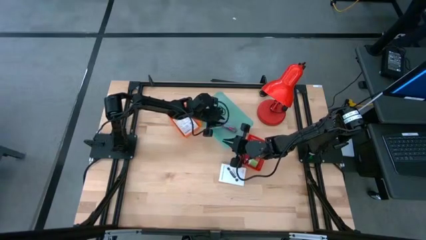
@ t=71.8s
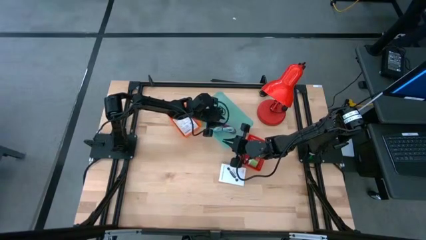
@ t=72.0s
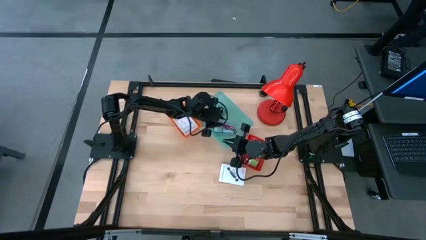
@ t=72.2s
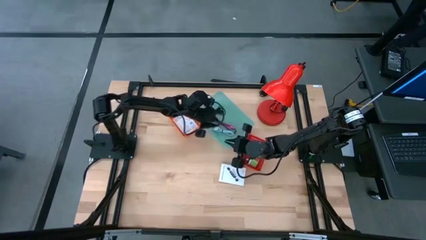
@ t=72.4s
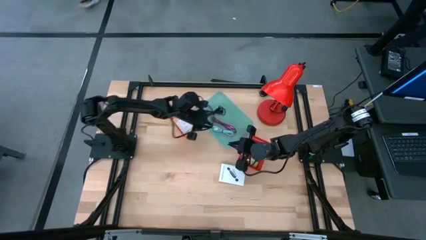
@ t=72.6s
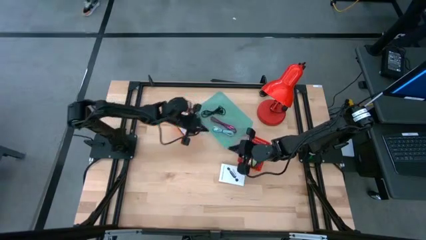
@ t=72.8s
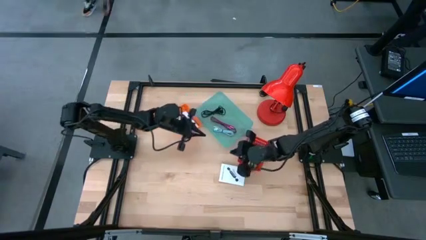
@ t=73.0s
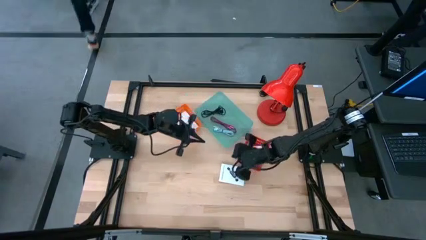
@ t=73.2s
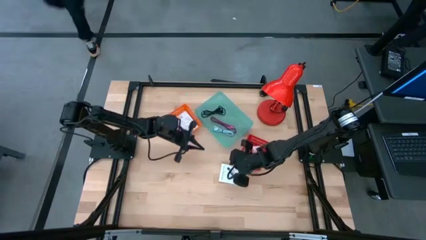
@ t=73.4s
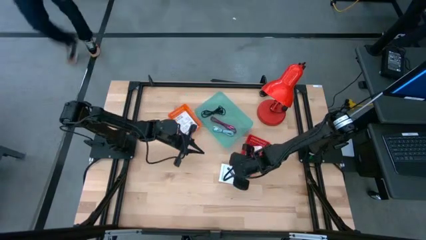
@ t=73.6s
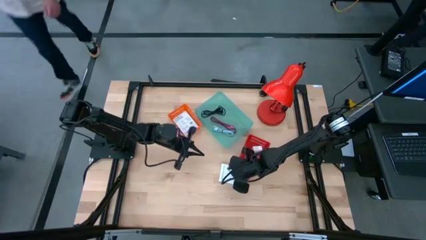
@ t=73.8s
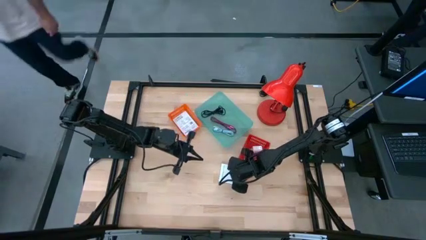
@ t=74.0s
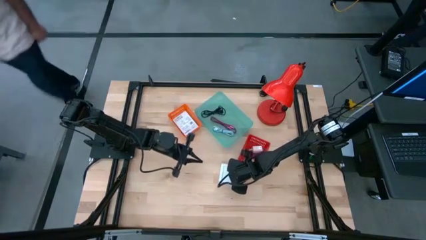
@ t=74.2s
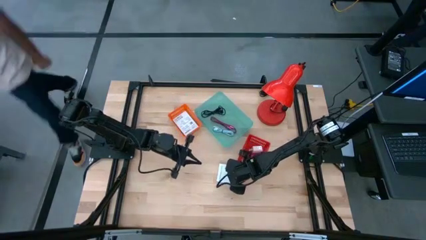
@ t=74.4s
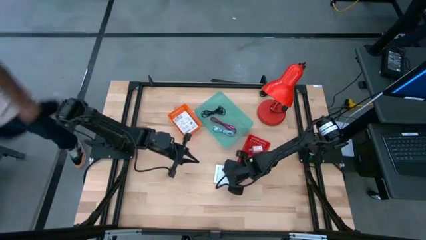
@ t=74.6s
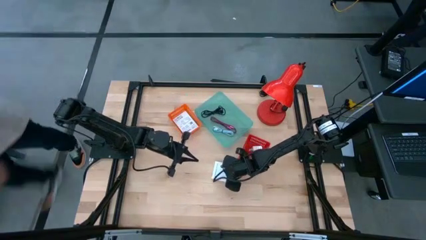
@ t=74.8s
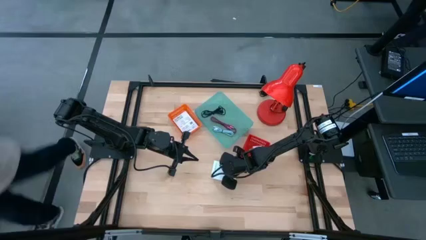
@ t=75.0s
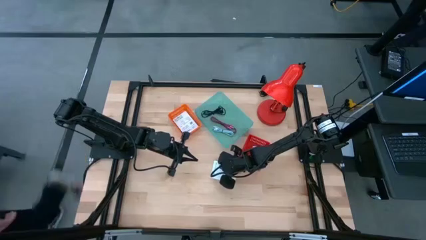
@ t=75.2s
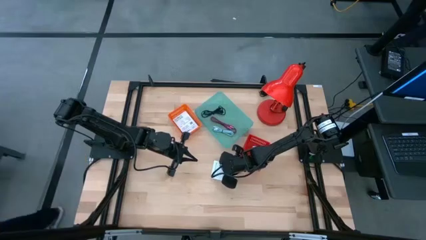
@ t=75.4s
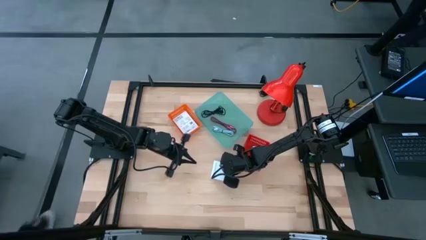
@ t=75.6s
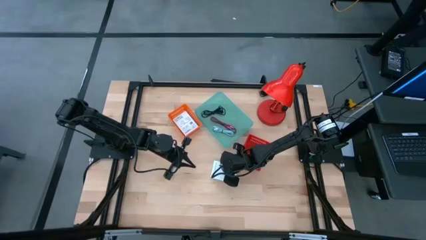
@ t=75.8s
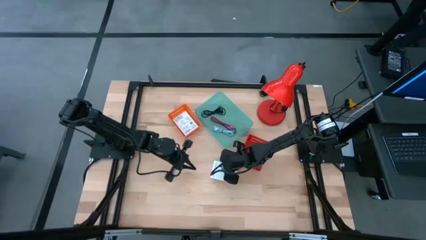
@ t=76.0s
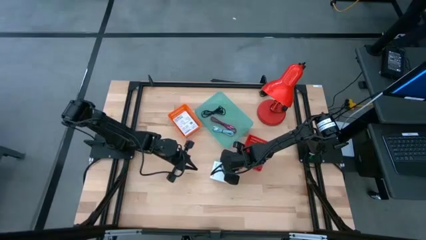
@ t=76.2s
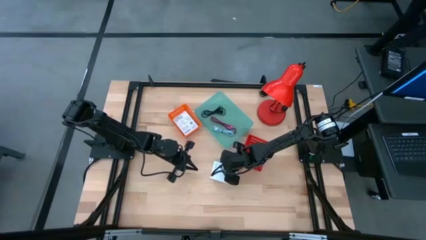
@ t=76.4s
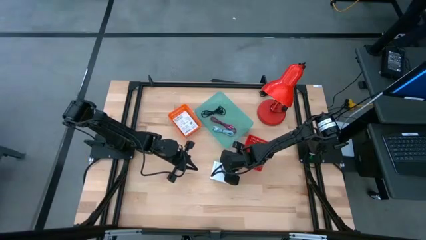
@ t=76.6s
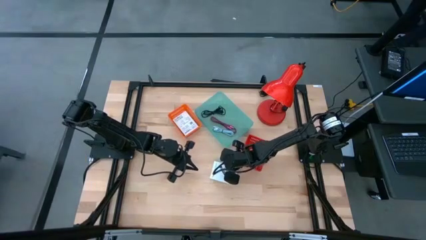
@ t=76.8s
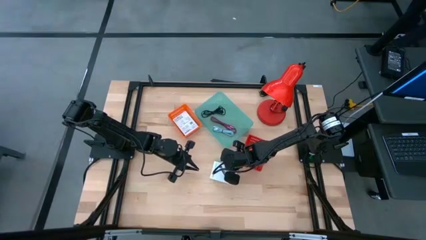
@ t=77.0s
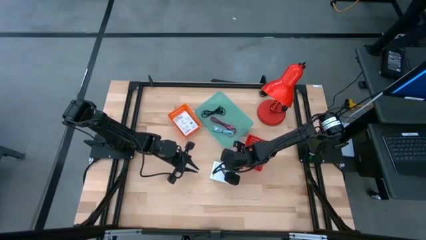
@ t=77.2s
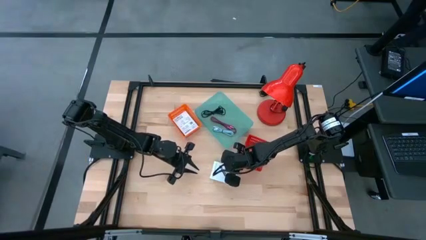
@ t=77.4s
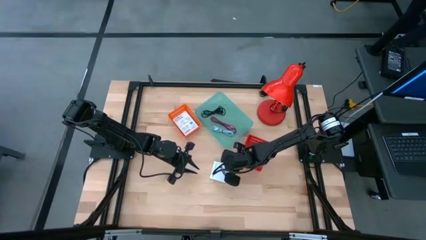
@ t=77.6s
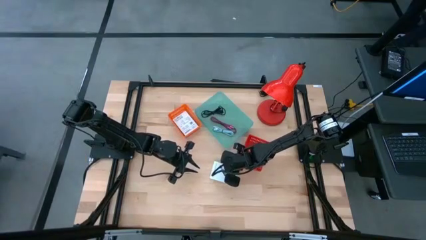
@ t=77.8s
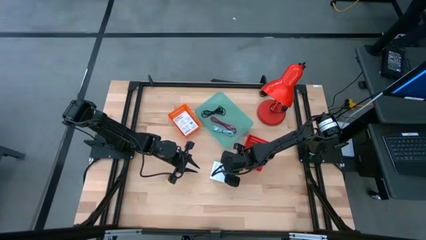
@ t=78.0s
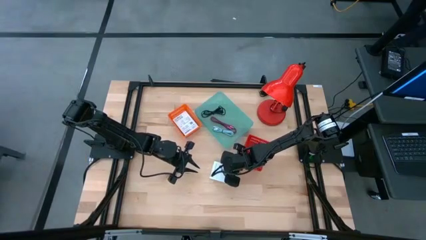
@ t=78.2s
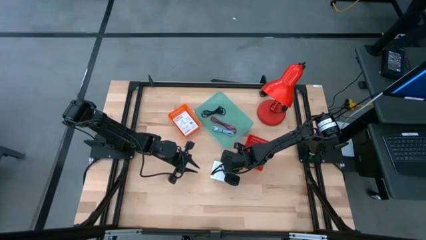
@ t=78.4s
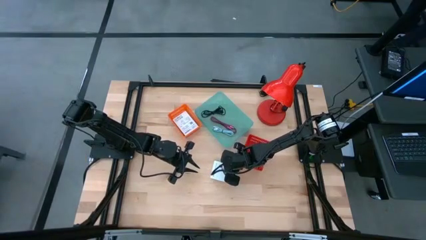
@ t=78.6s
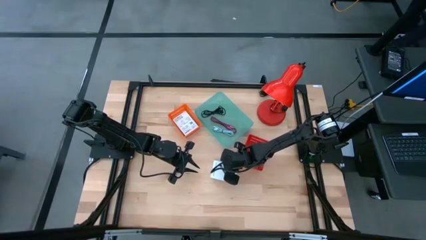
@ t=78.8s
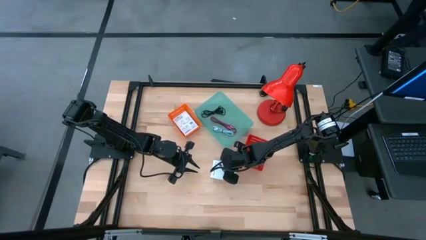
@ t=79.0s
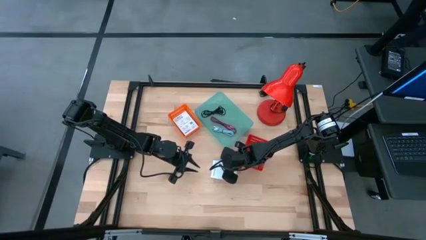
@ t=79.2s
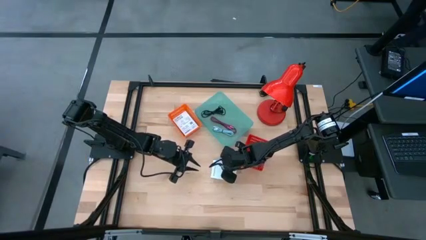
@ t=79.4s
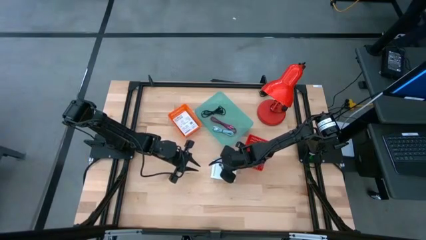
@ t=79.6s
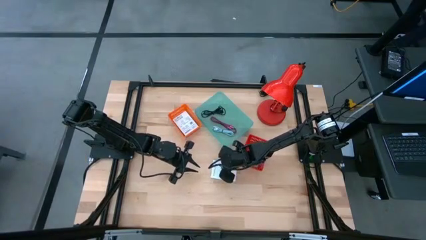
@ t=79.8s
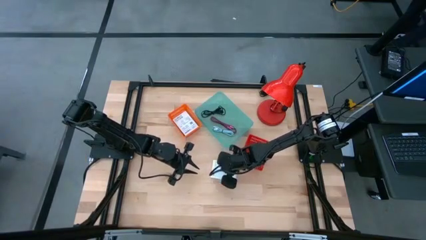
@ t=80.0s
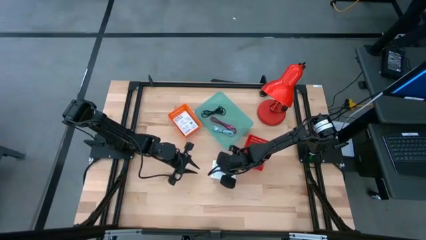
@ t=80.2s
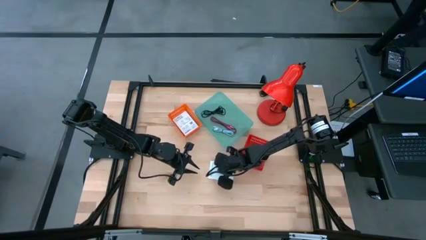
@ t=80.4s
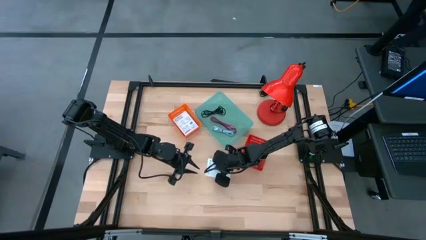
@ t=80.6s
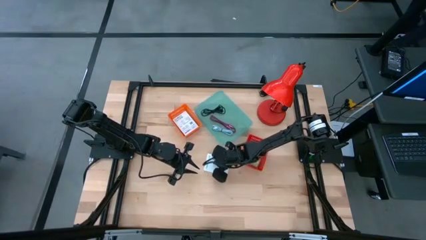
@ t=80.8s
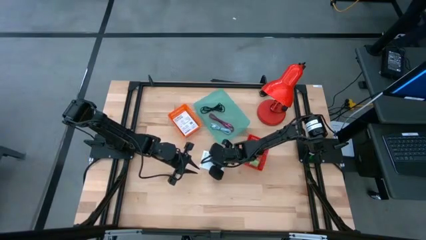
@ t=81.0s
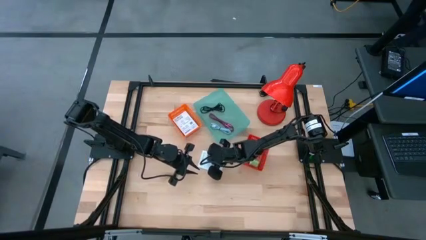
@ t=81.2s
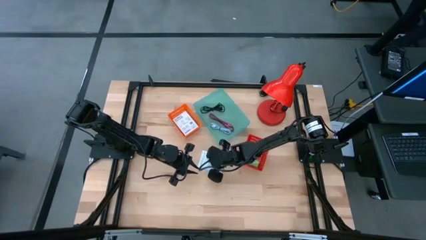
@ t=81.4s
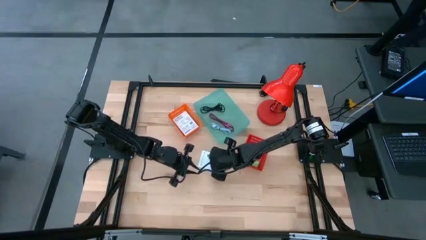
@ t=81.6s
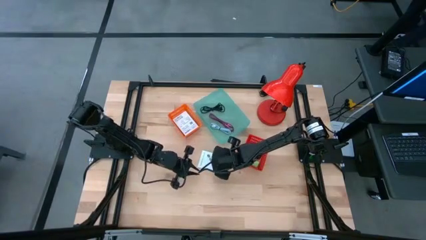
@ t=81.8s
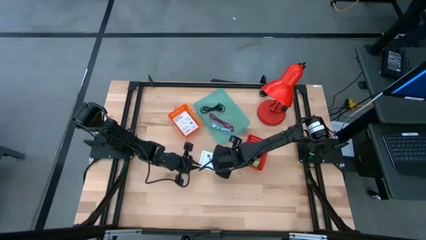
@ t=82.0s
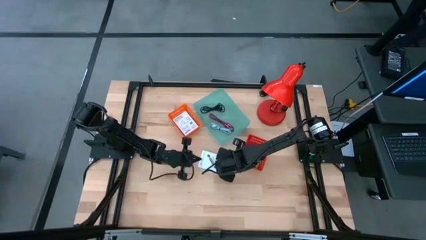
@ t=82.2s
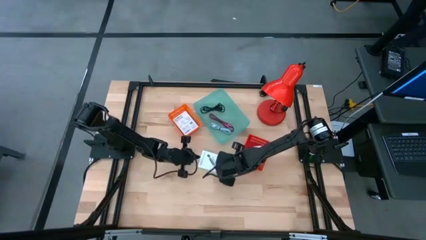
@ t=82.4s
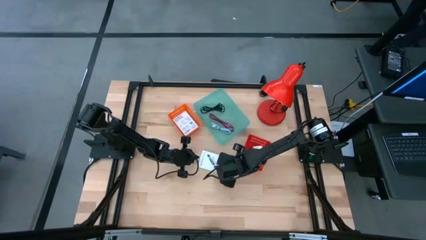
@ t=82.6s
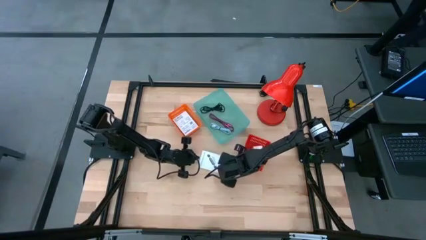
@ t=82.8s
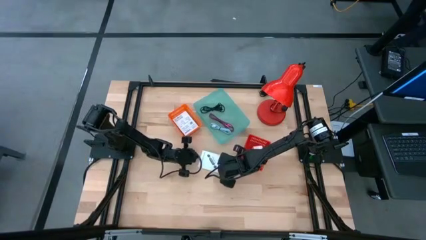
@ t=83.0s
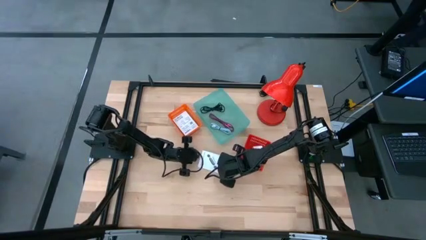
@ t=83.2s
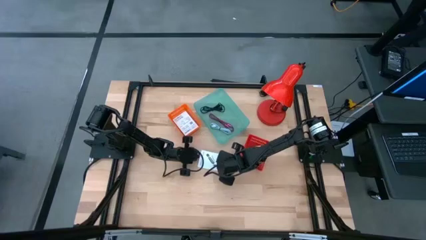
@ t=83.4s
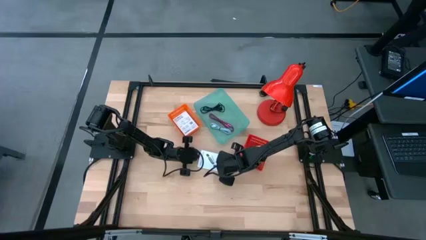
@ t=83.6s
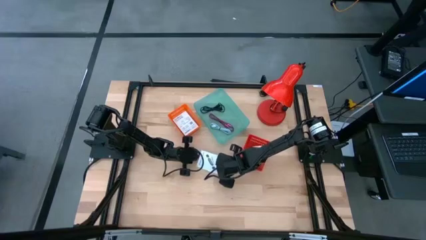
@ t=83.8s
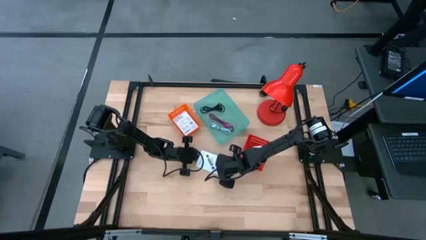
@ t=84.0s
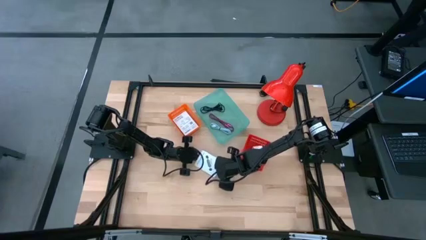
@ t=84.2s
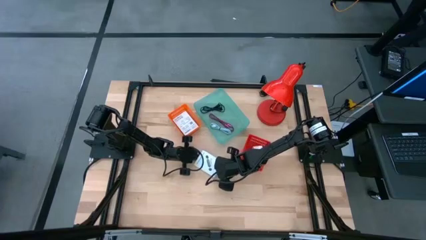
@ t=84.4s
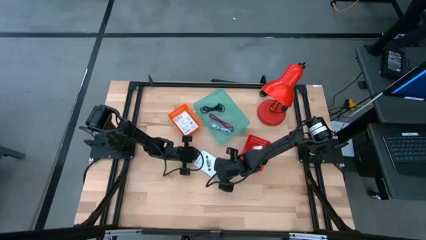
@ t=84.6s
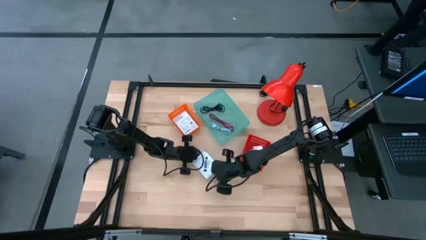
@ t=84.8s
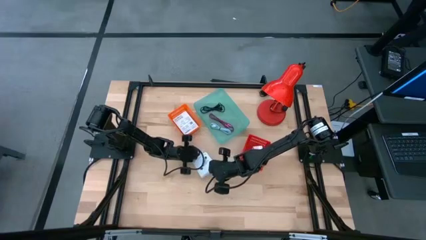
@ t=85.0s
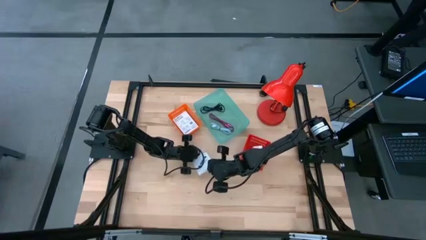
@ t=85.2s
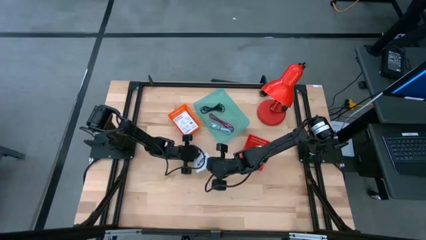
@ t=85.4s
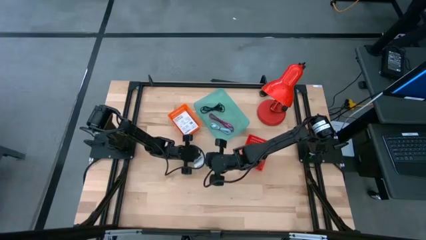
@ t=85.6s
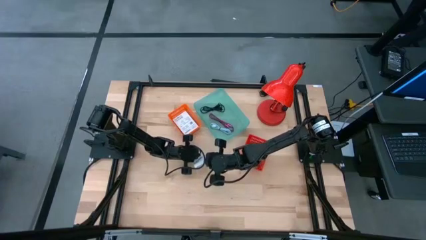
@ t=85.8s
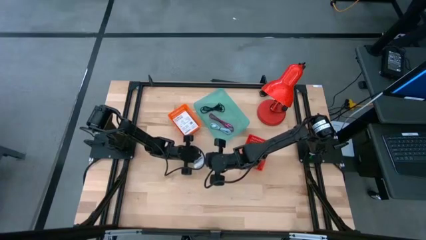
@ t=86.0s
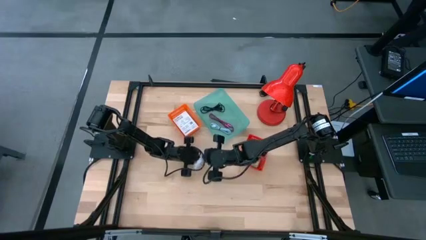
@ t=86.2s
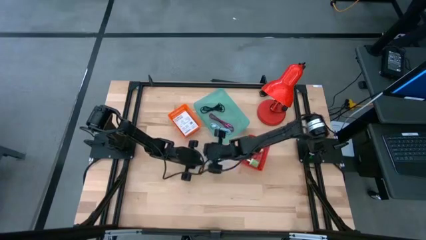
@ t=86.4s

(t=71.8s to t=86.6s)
Task: Pick and place items into bin
Put the white card reader box into the orange bin
